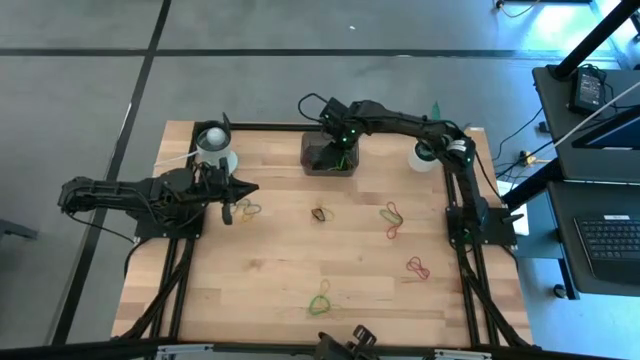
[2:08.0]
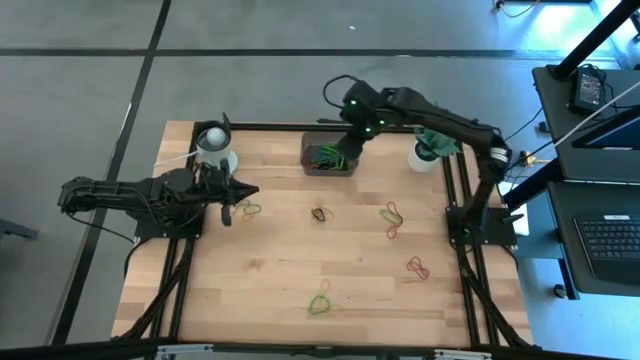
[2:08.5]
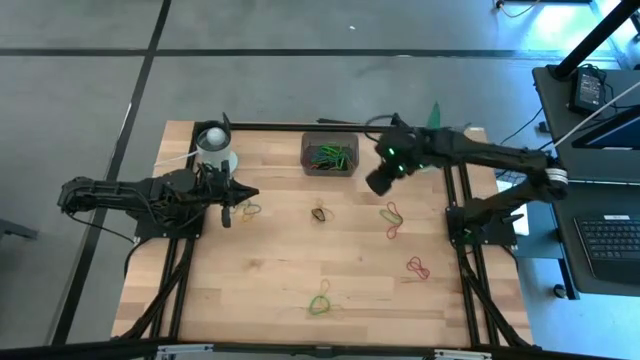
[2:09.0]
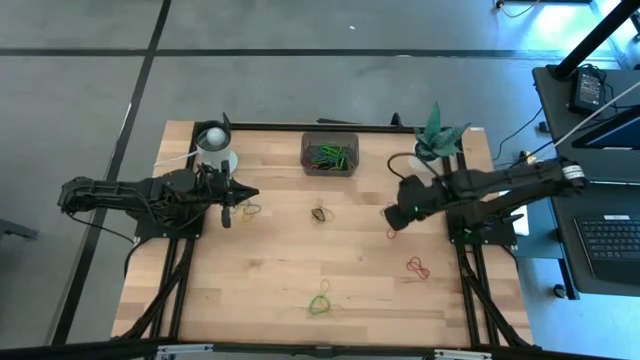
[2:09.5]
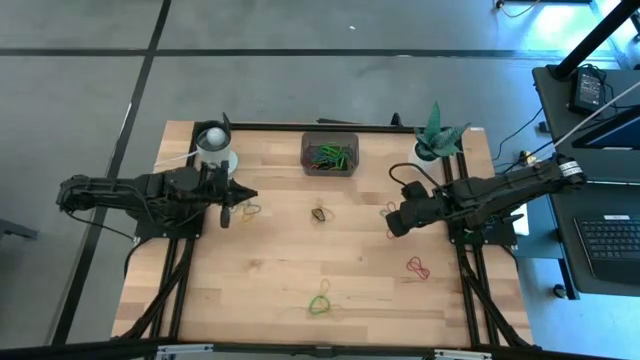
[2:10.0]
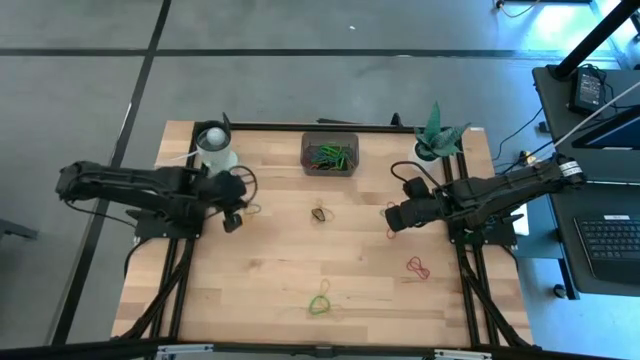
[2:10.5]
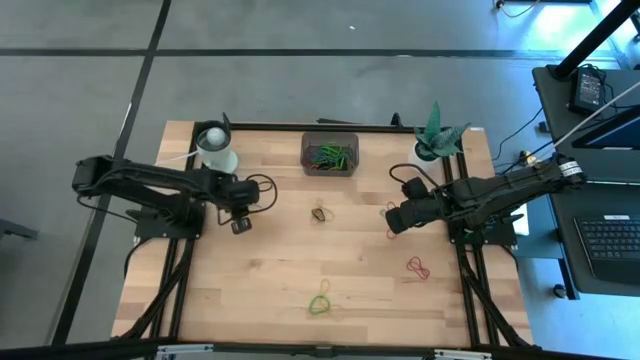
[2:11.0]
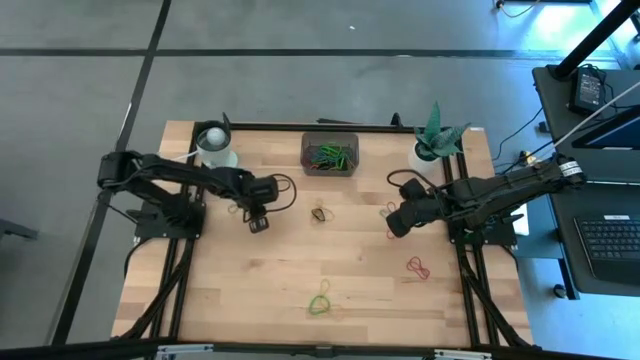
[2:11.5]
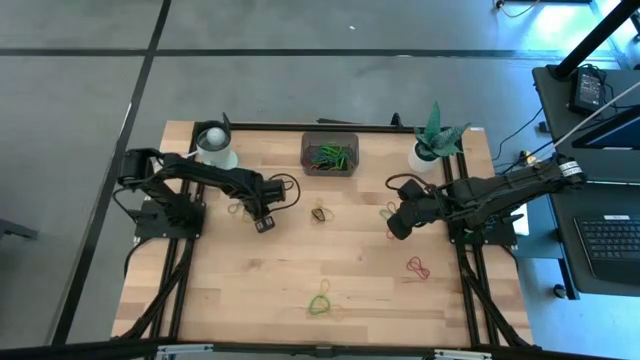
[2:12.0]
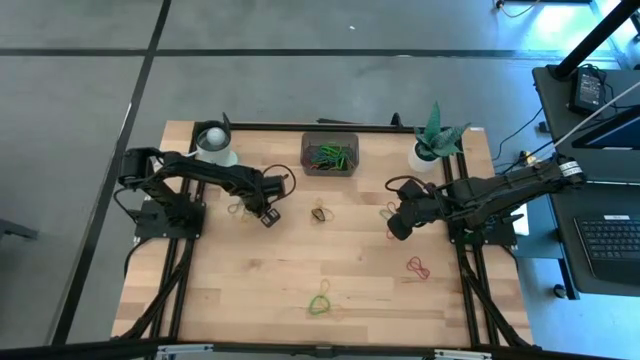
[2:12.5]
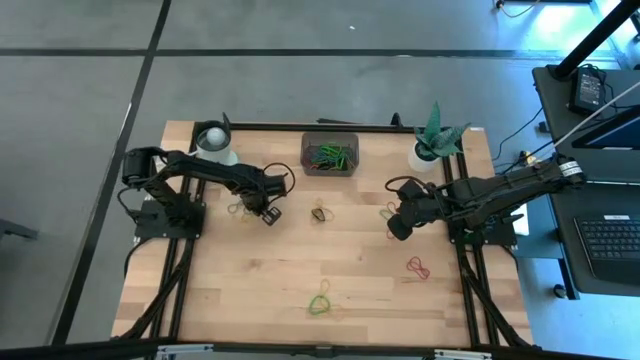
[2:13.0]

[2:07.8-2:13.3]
Task: Pick and place rubber bands into bin
Put the blue rubber band into the bin

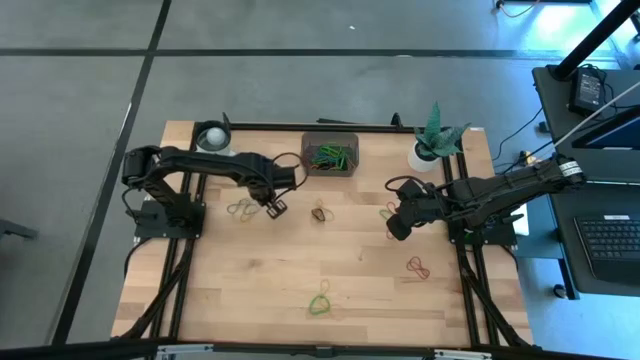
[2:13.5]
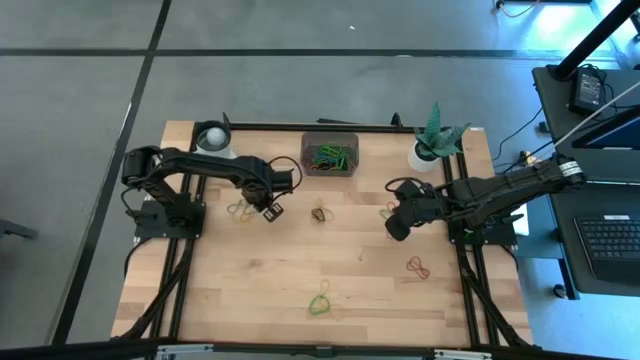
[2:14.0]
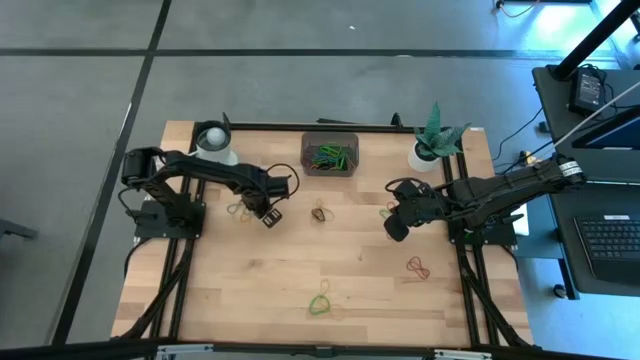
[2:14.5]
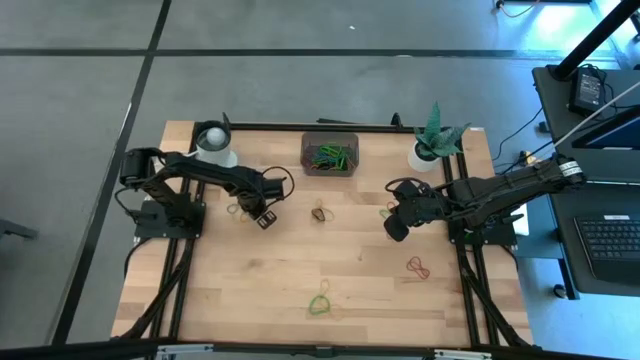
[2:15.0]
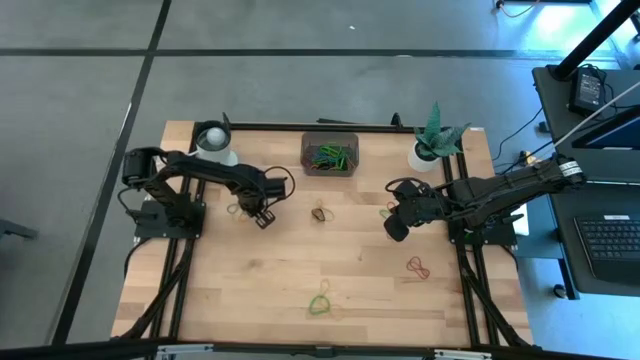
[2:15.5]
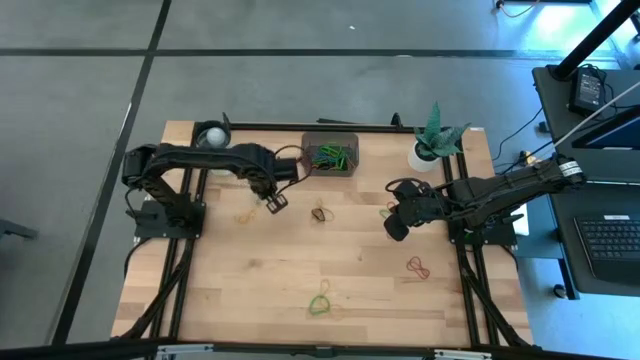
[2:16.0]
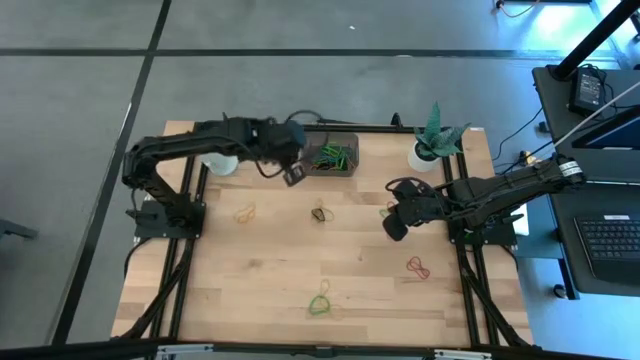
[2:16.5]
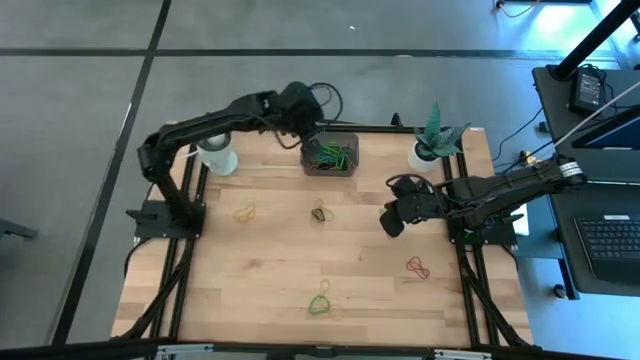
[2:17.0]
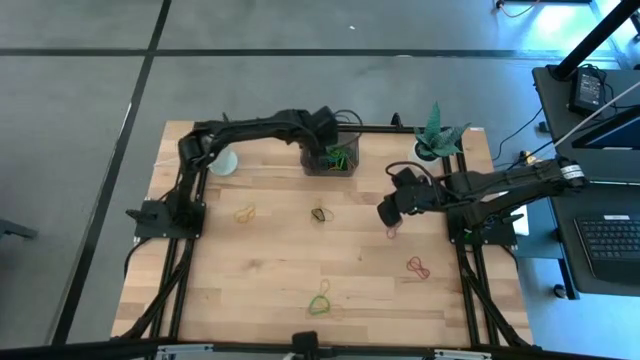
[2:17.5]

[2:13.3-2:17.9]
Put the blue rubber band into the bin

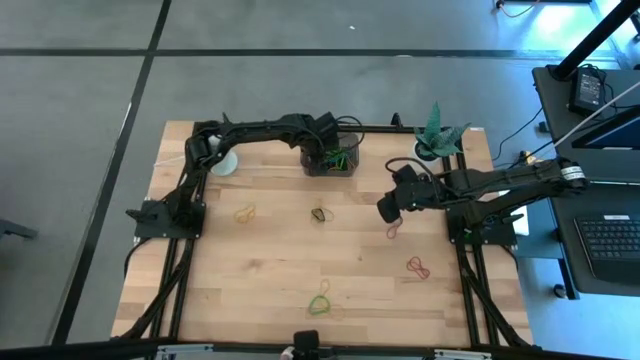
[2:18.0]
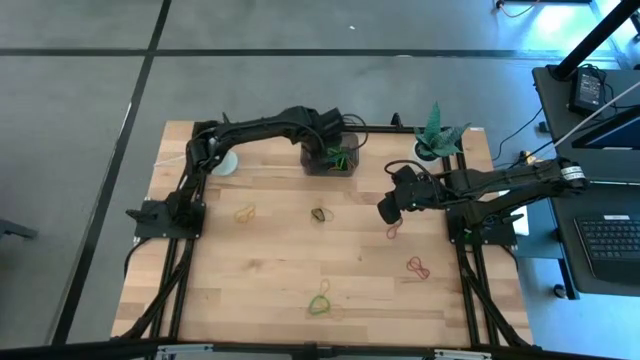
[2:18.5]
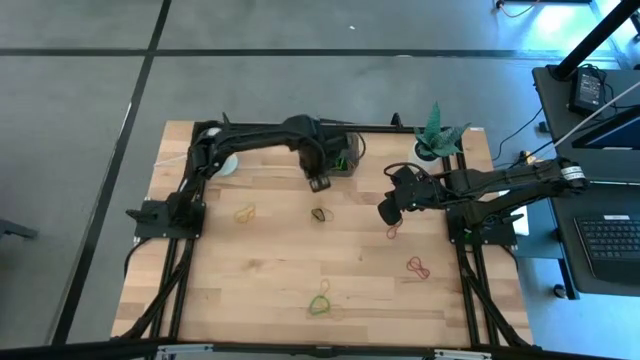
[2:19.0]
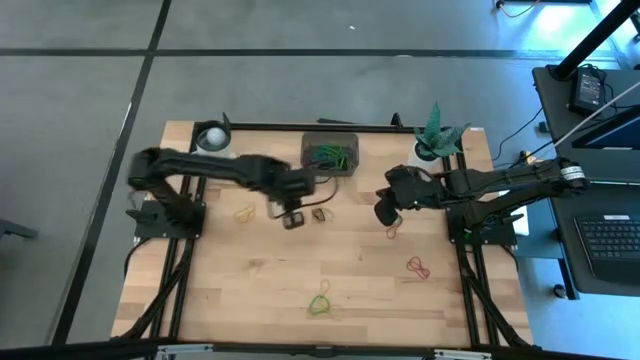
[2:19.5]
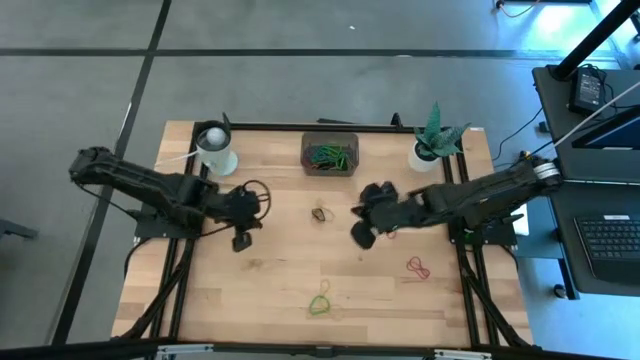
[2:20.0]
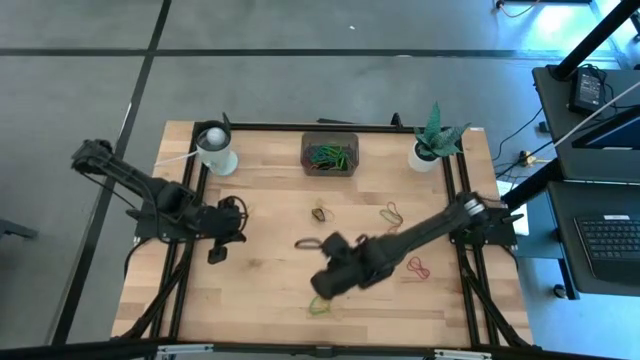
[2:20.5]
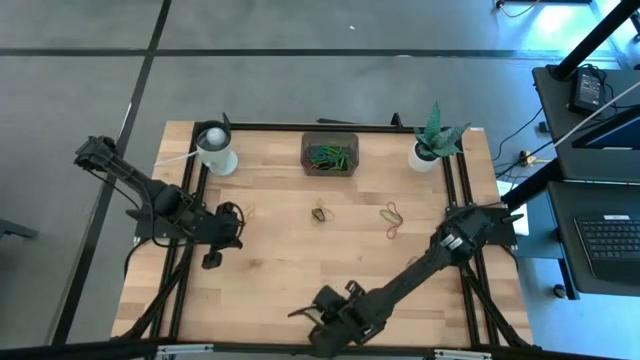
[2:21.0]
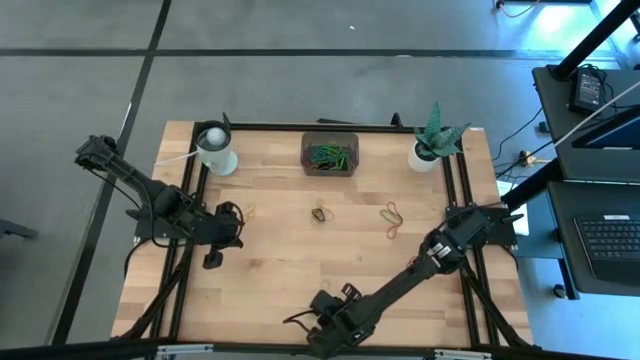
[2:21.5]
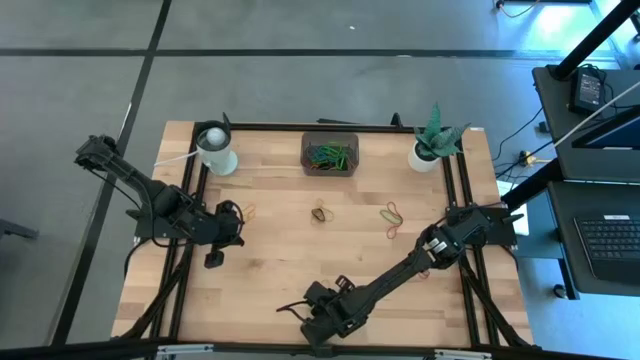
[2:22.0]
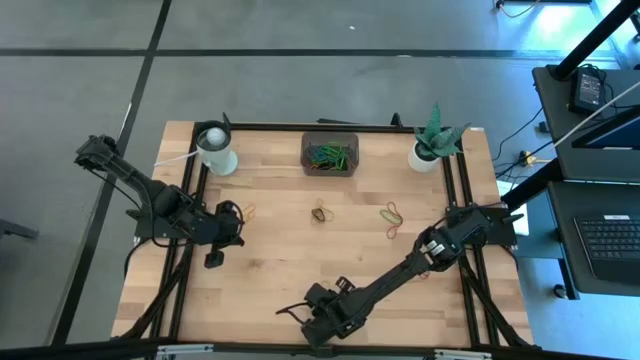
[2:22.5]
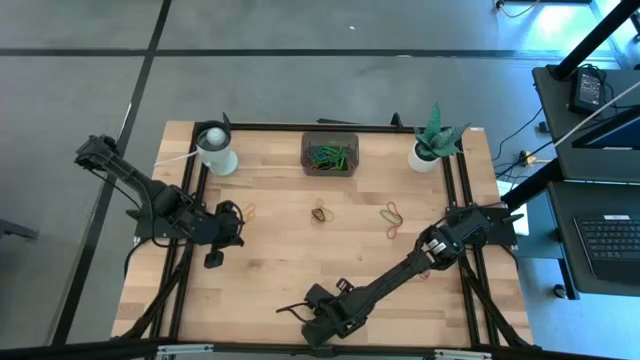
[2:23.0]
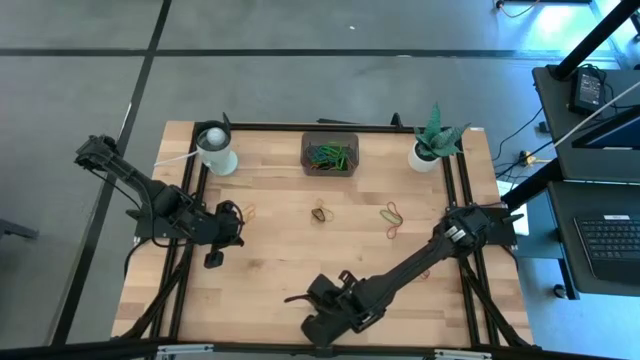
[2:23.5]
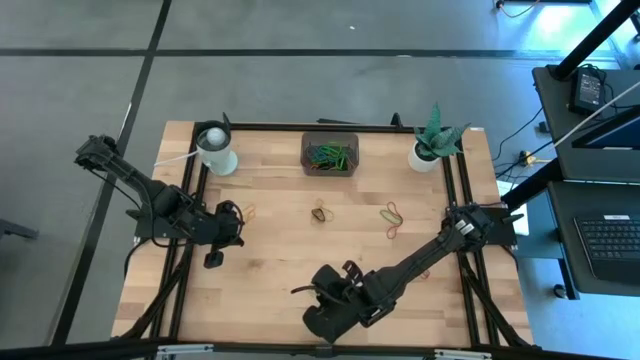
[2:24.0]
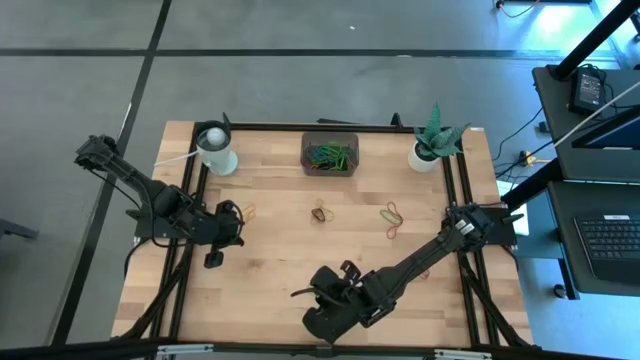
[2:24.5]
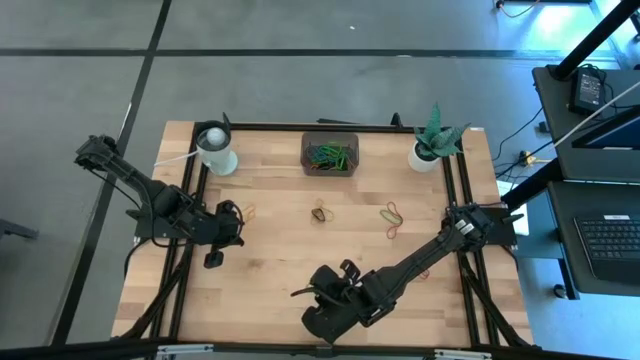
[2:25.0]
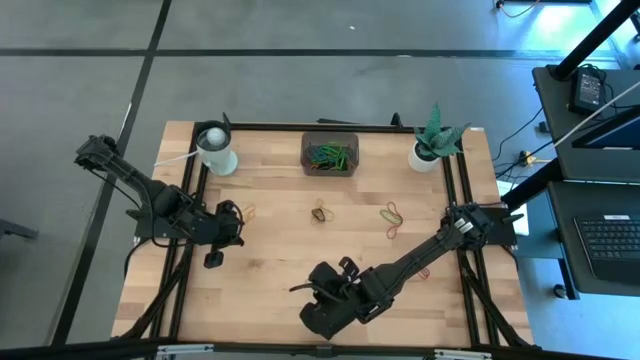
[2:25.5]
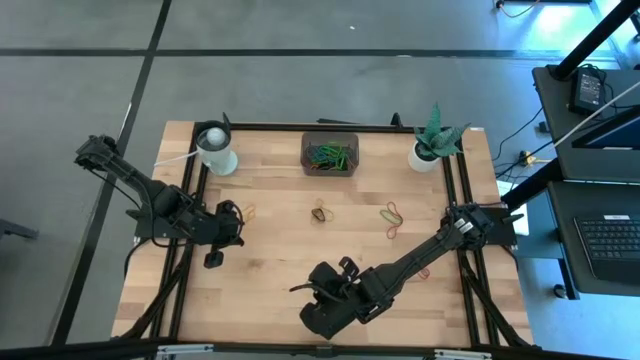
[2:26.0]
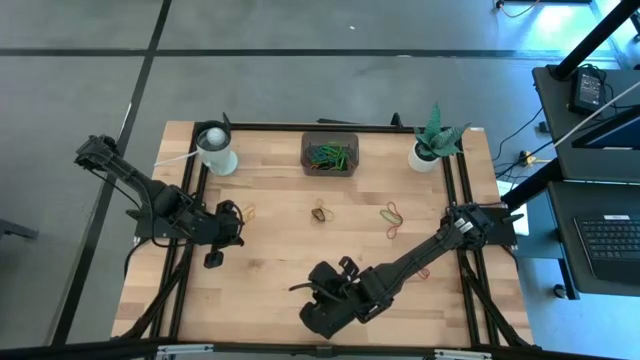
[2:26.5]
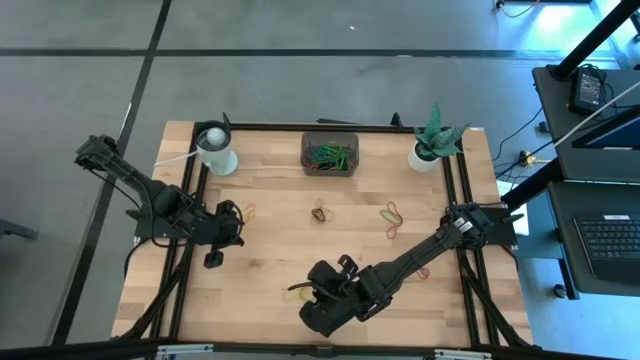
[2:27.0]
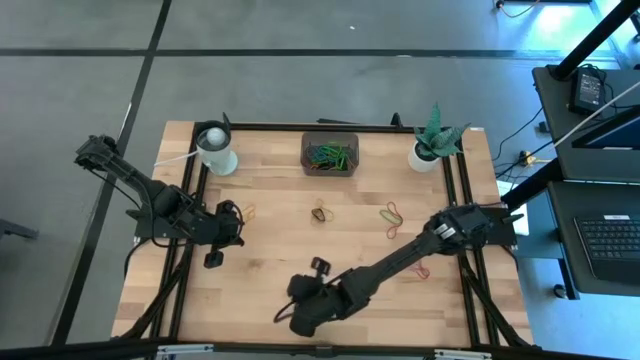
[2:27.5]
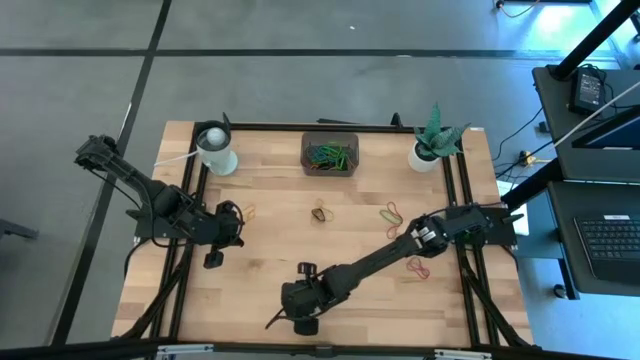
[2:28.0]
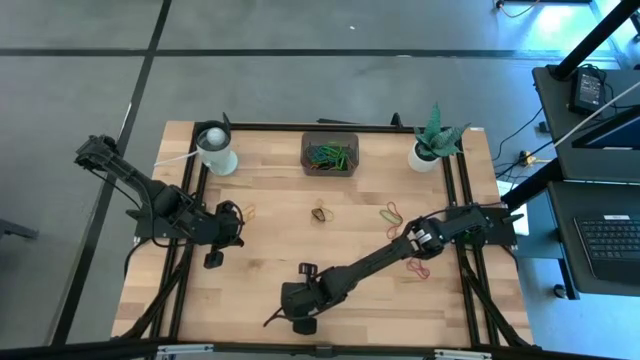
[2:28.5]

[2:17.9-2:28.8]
Put the yellow rubber band into the bin

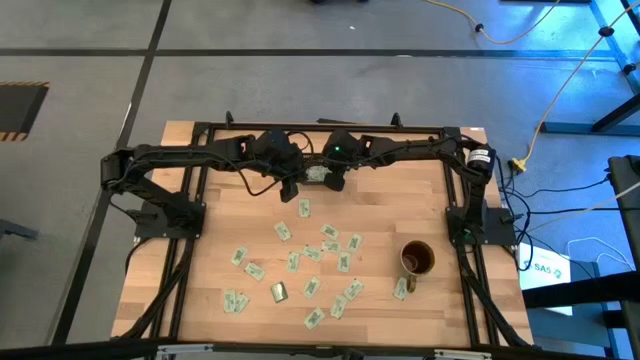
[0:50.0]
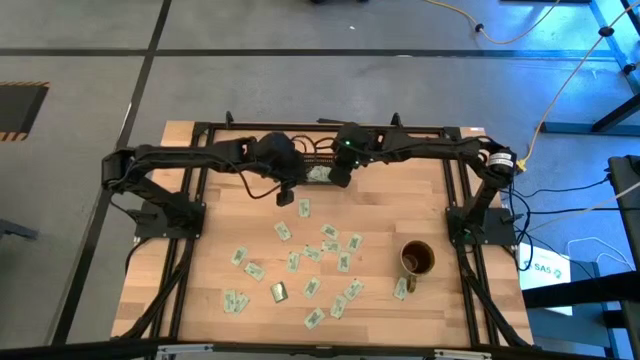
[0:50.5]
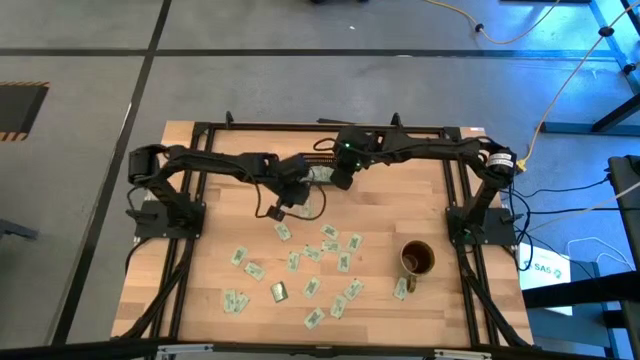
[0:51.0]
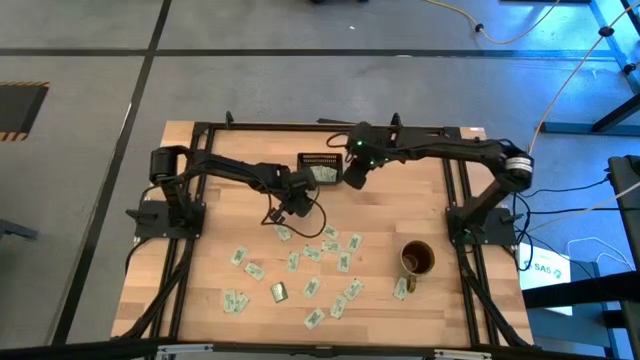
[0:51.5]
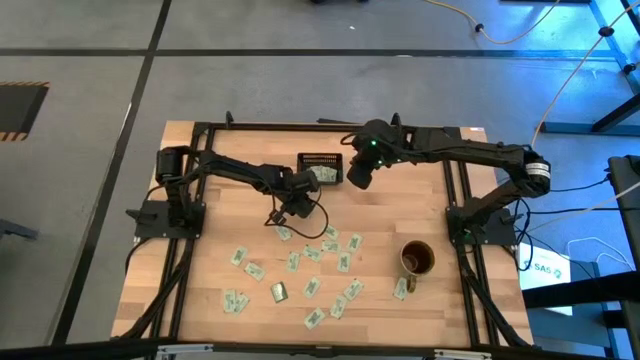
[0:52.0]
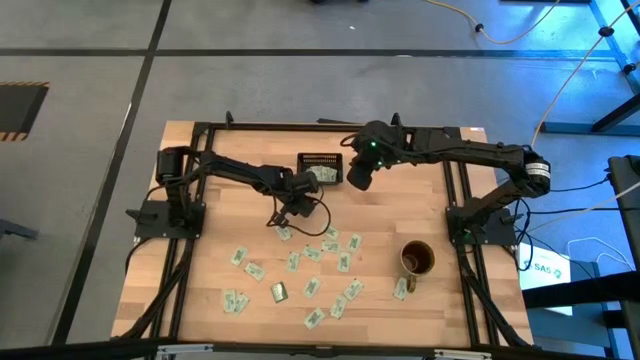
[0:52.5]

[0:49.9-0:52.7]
Task: Pick and place Stevia / Truvia into bins
Put the white stevia packet into the black bin
